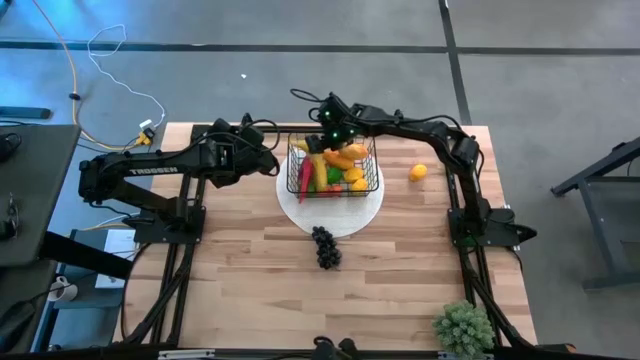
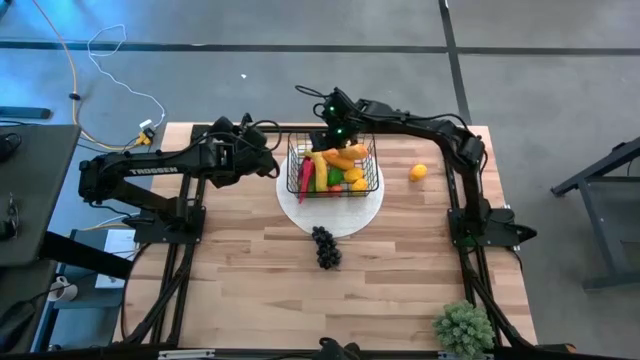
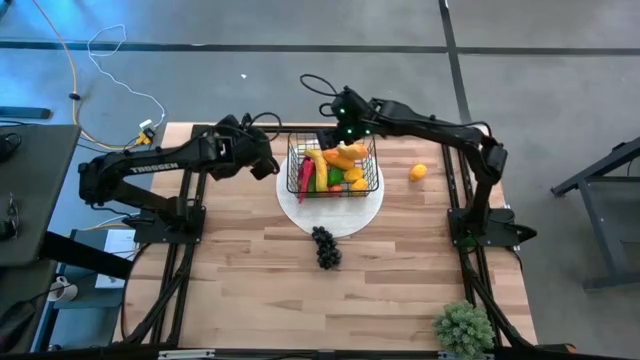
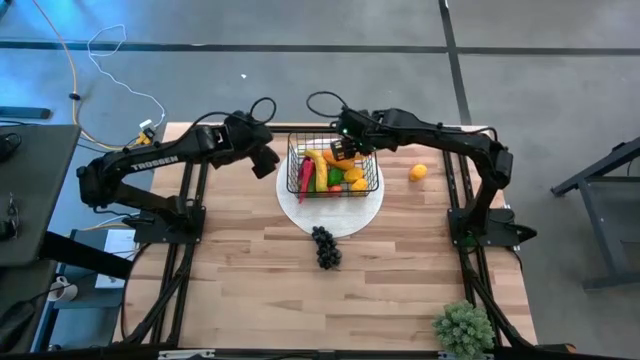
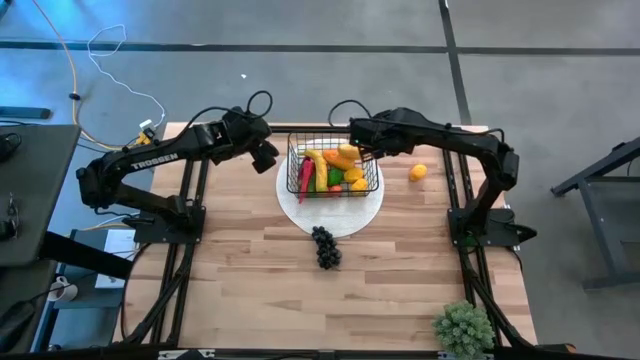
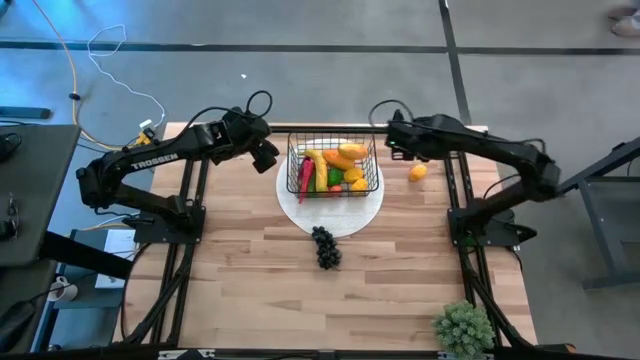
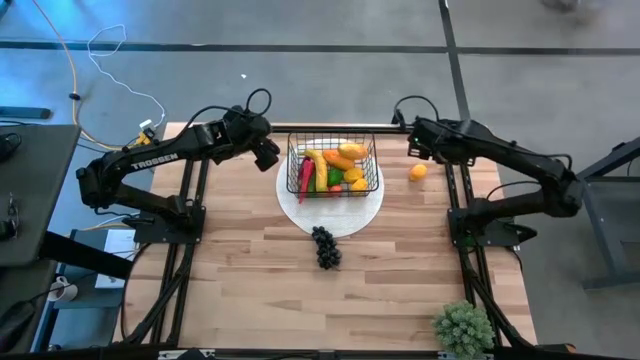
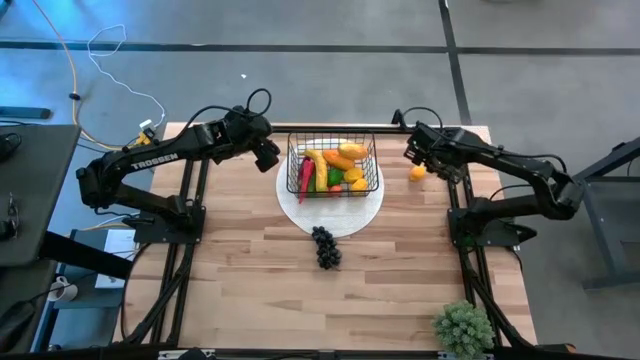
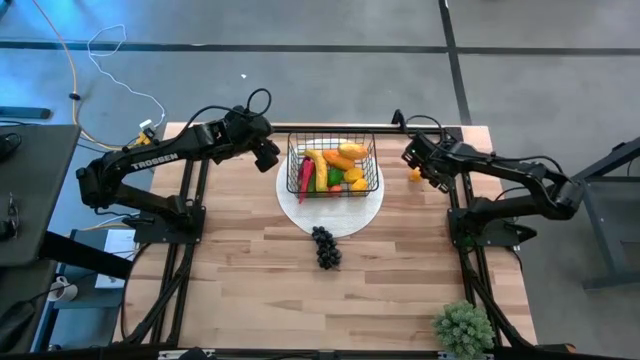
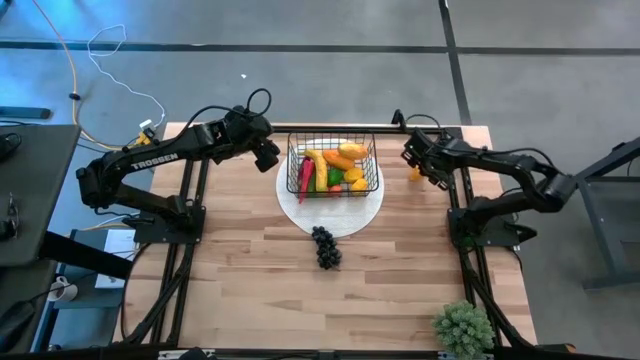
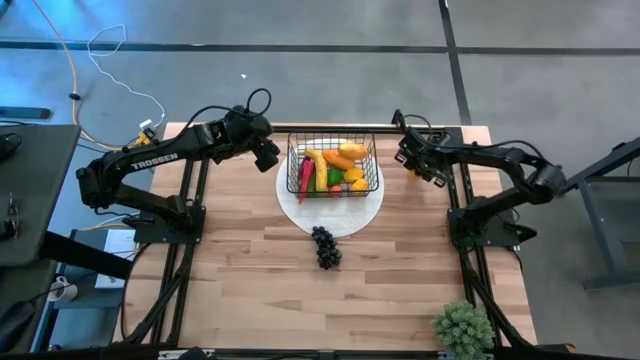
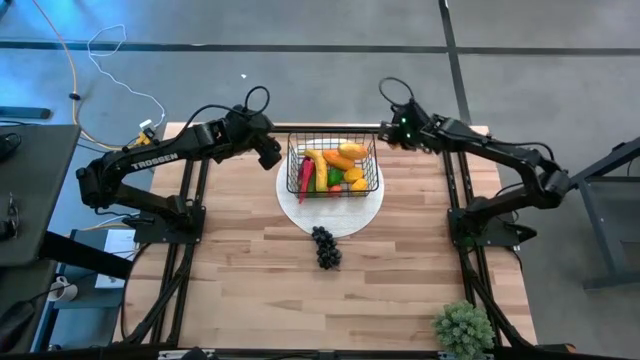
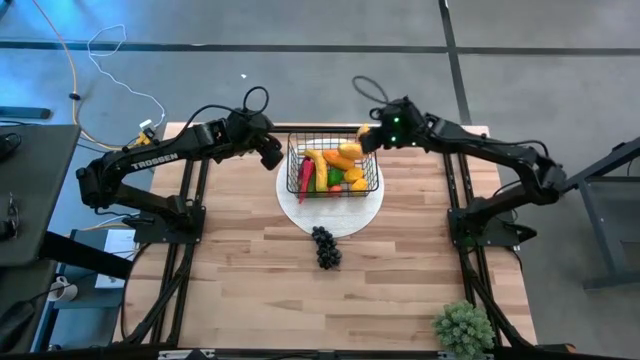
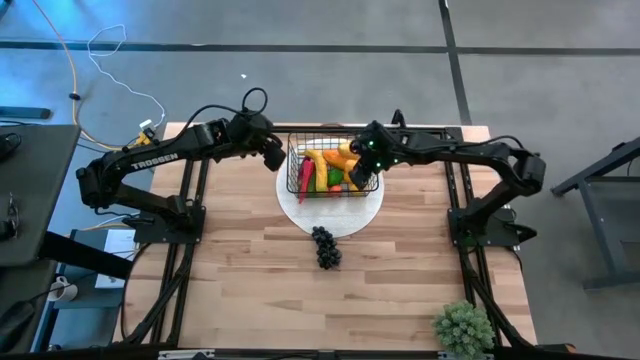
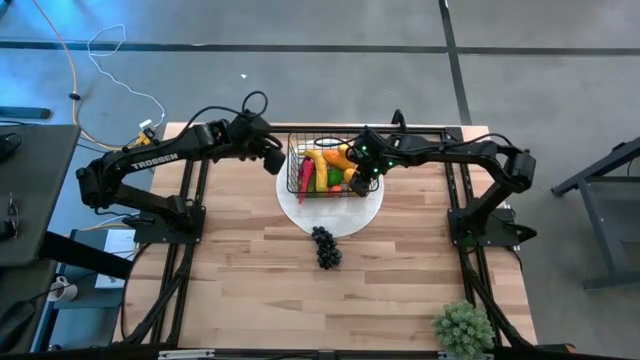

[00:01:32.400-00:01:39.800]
Task: Build produce basket
Put the yellow lemon into the wire basket

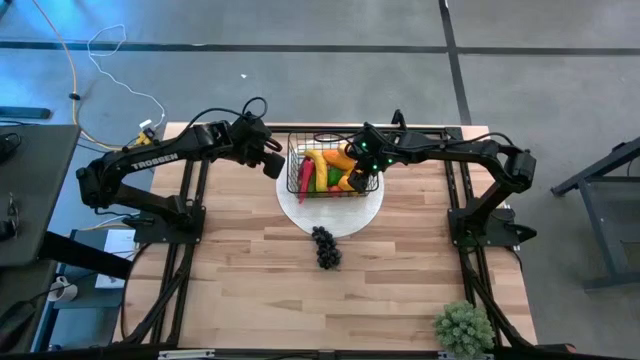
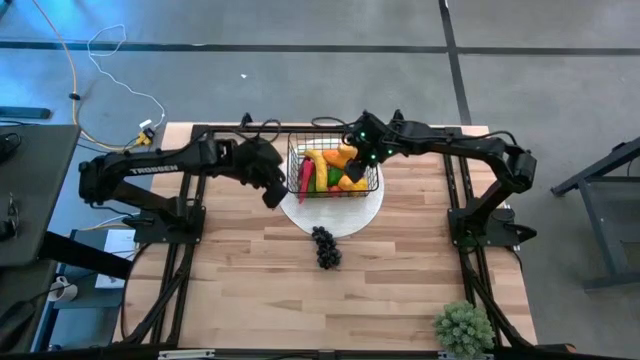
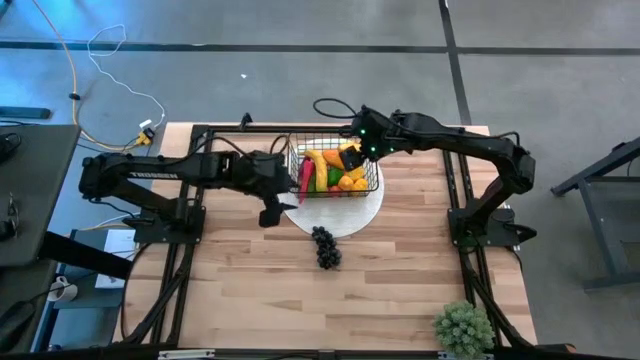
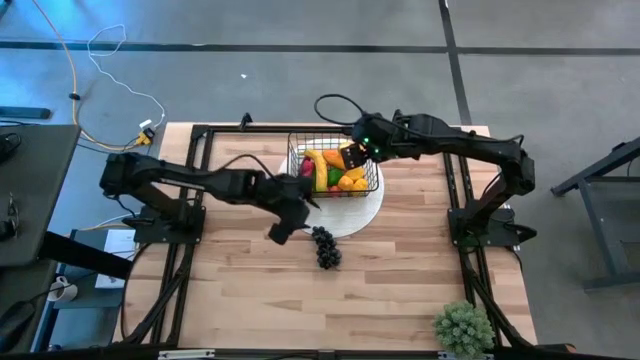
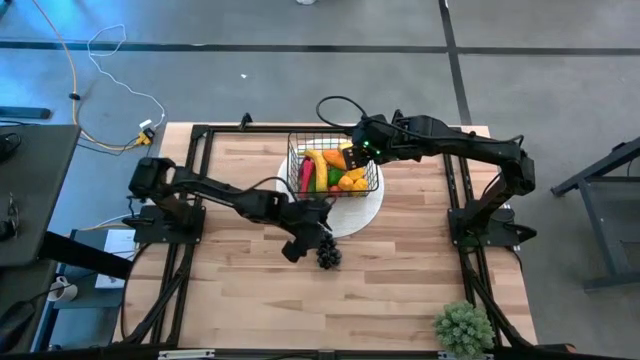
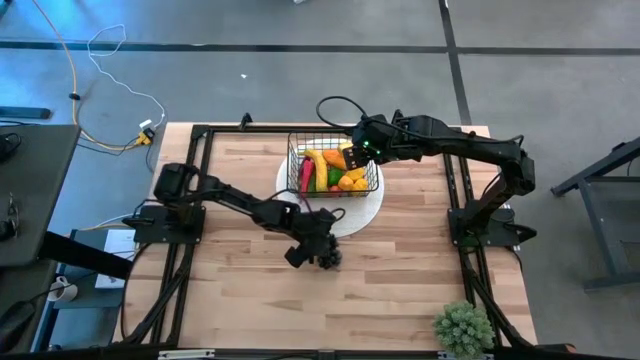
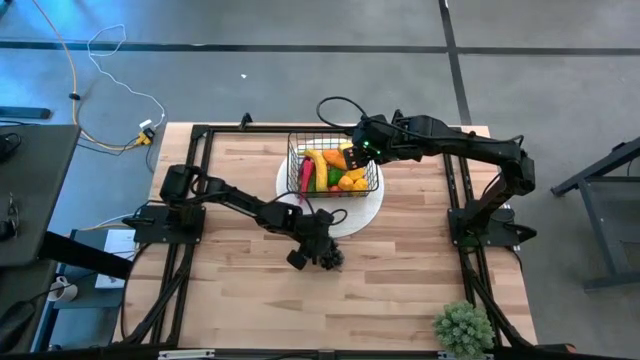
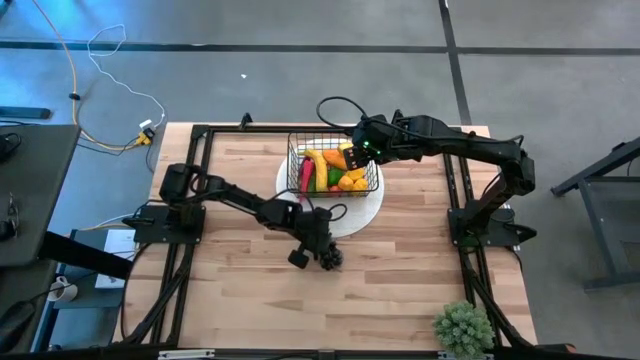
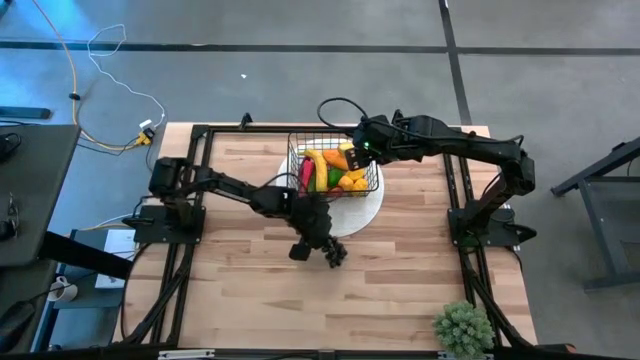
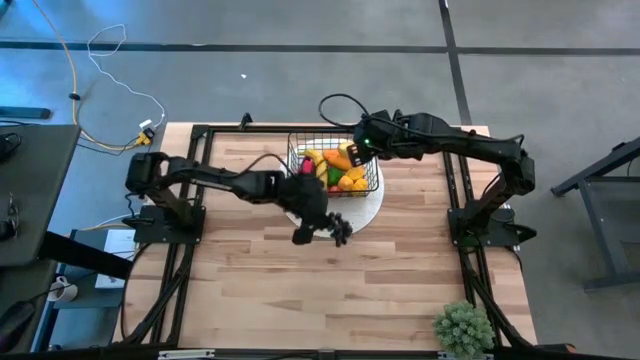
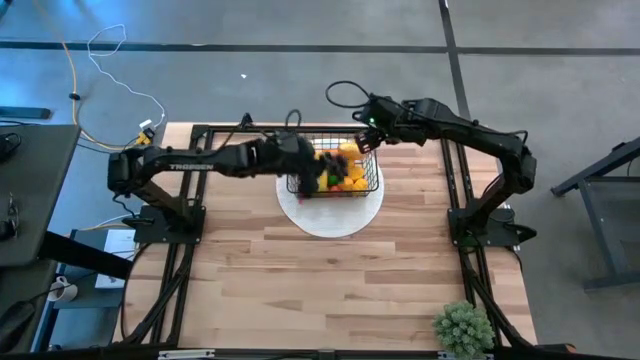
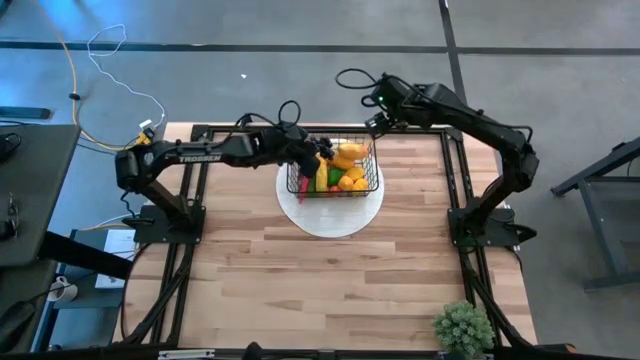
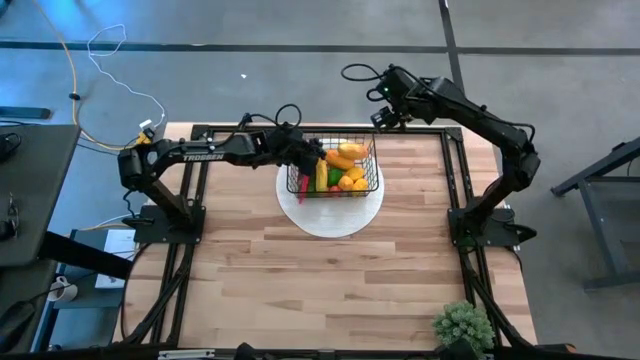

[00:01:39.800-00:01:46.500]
Put the black grapes into the wire basket

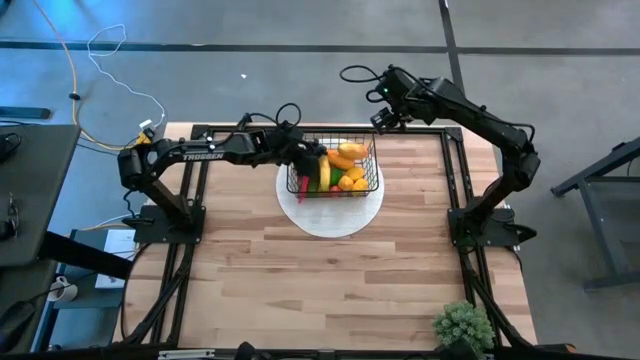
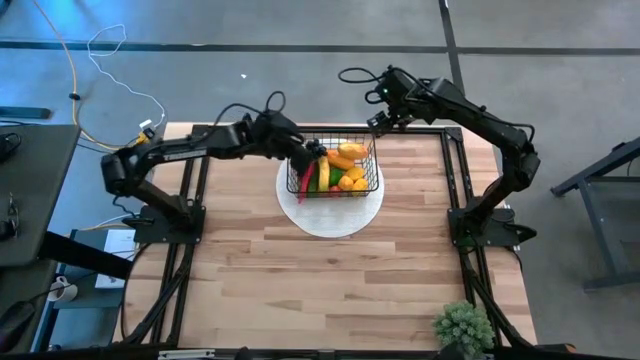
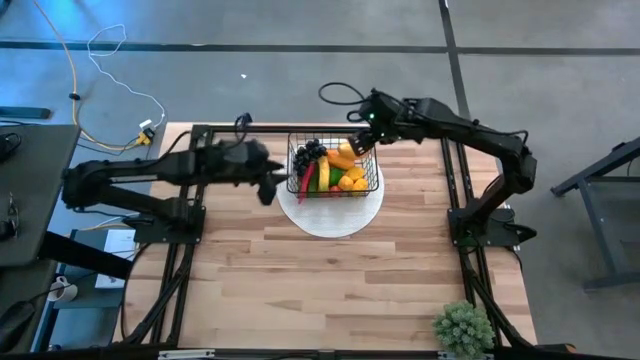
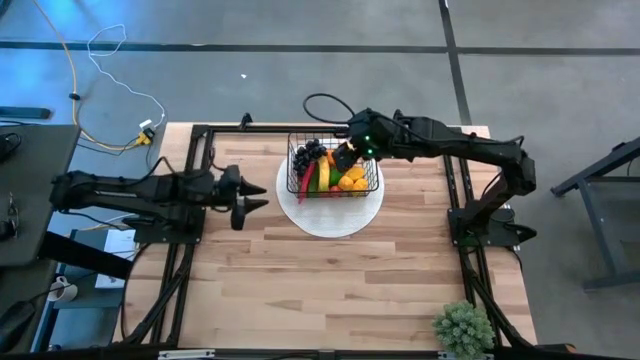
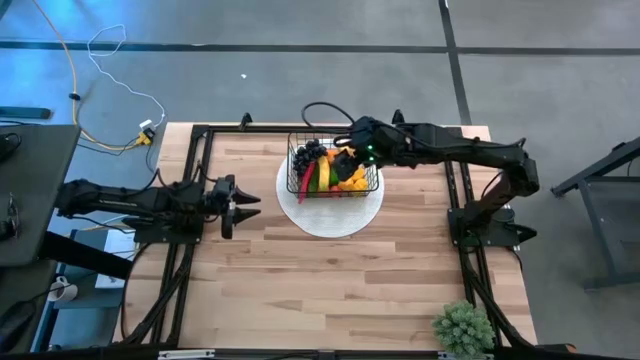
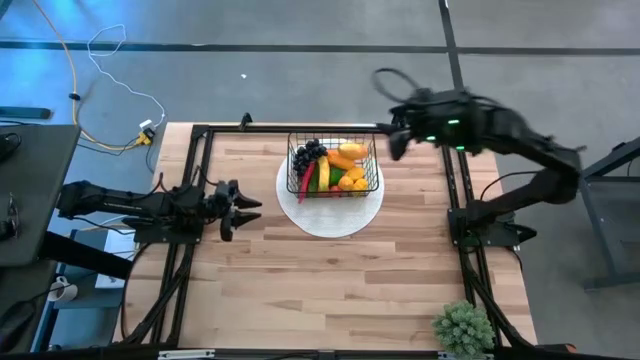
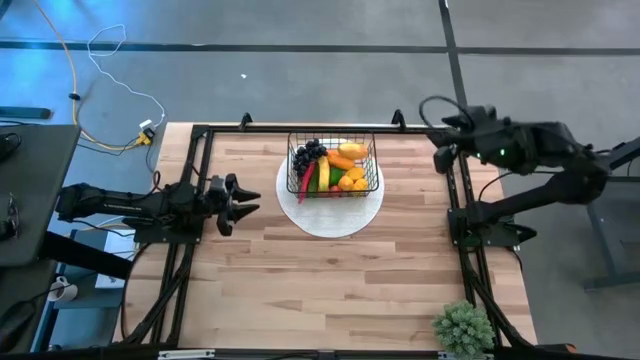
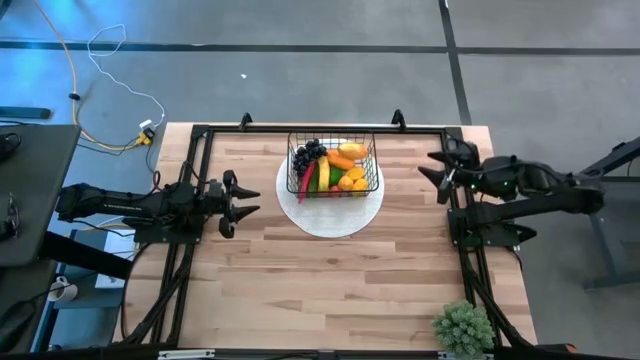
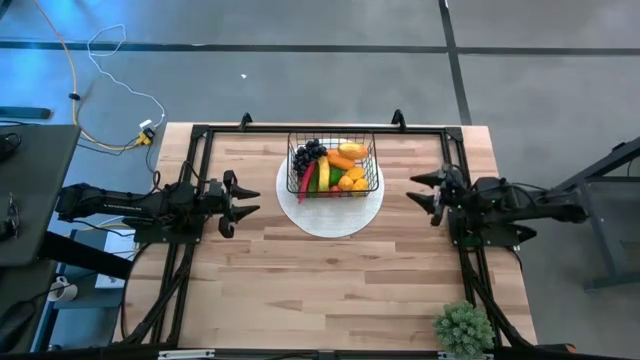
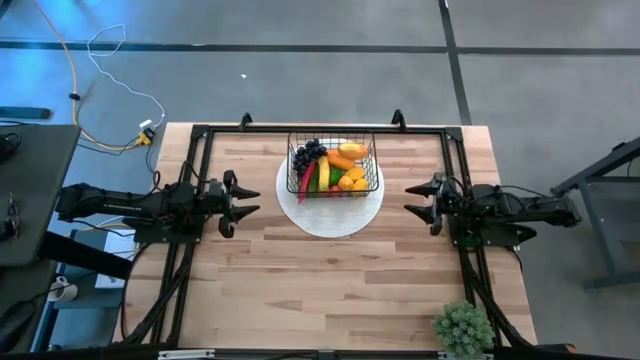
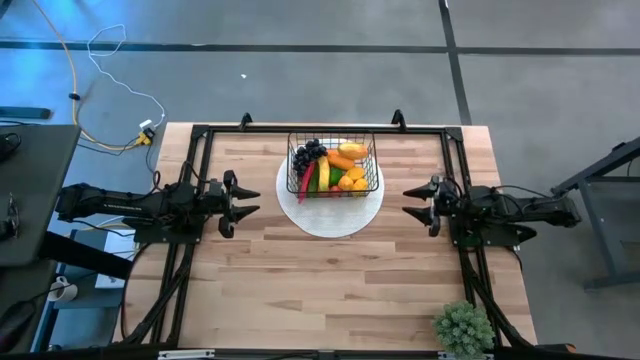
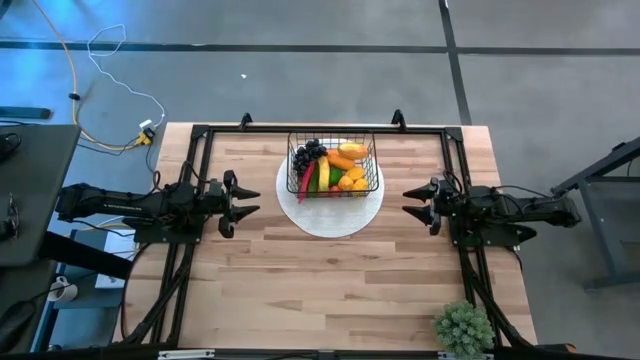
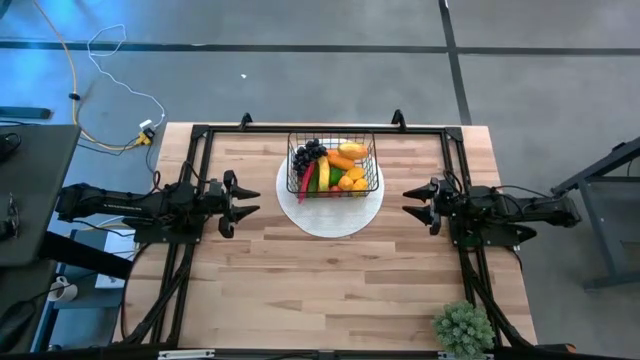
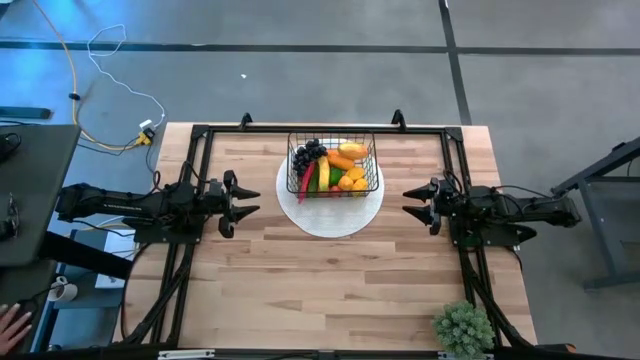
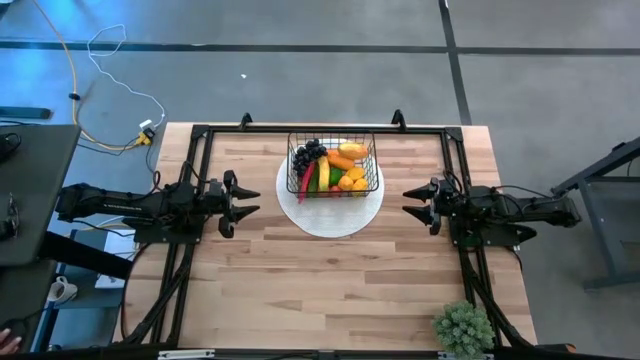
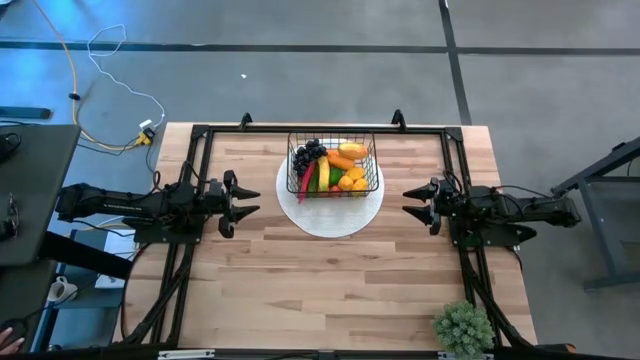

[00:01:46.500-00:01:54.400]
Return to Home Position
